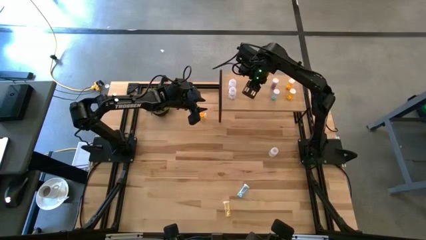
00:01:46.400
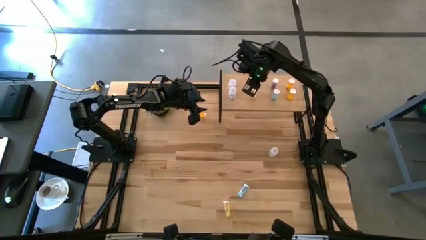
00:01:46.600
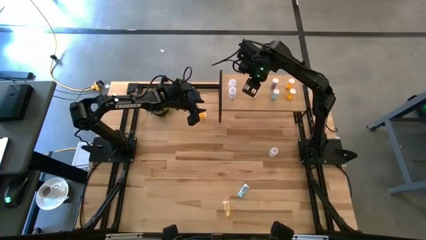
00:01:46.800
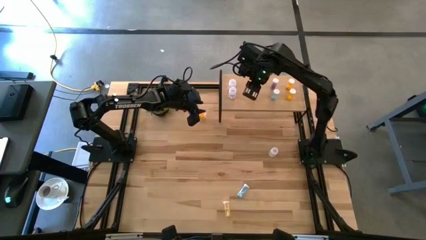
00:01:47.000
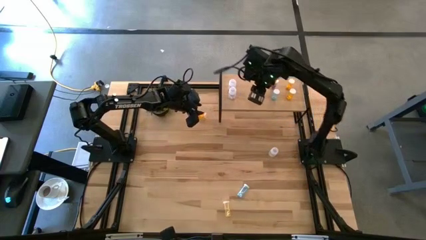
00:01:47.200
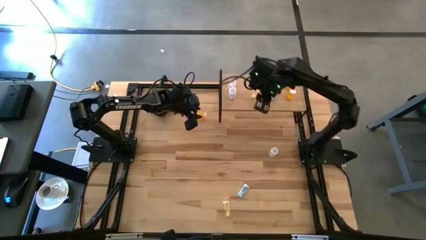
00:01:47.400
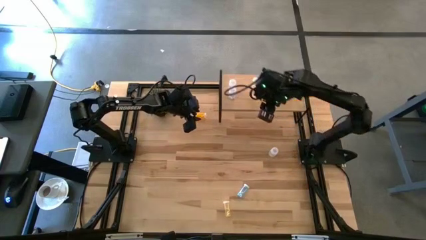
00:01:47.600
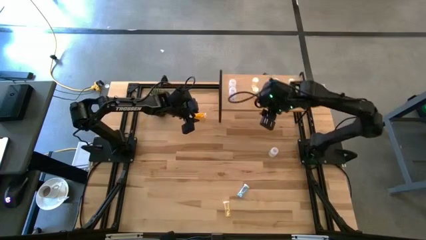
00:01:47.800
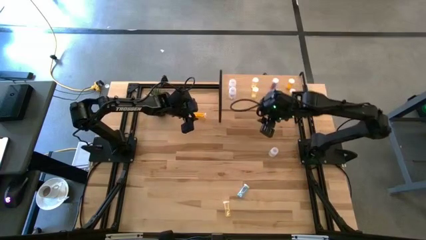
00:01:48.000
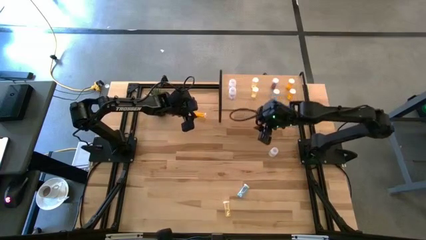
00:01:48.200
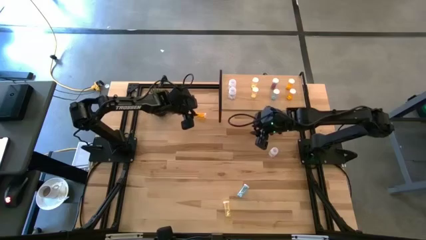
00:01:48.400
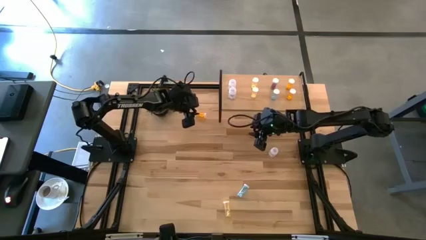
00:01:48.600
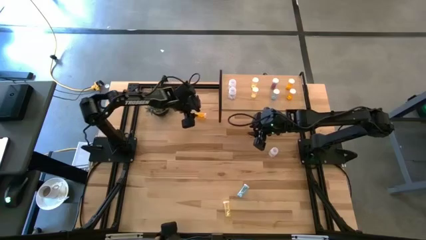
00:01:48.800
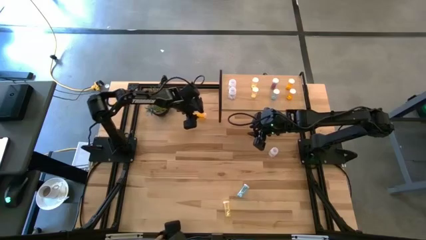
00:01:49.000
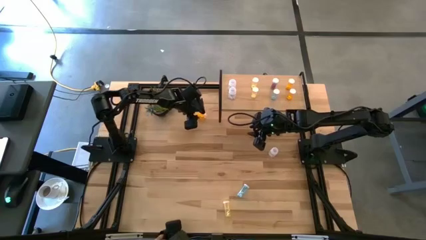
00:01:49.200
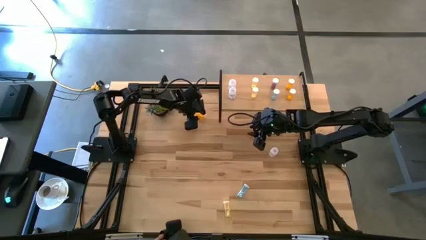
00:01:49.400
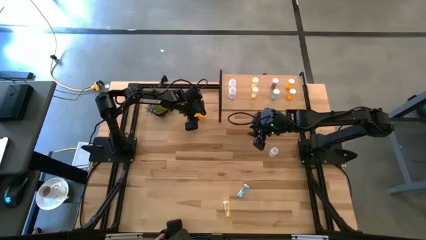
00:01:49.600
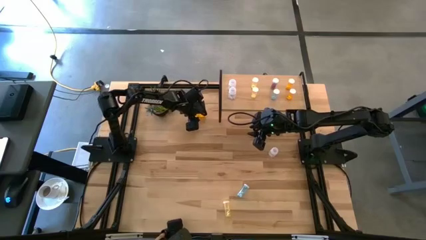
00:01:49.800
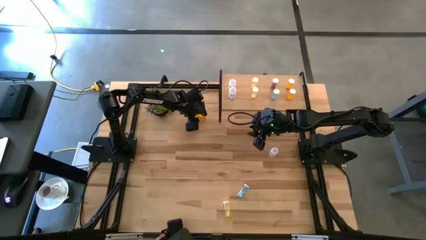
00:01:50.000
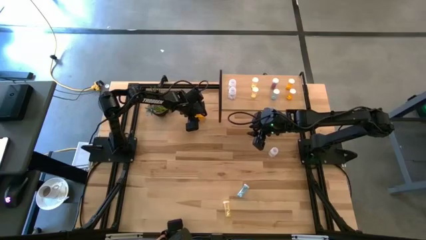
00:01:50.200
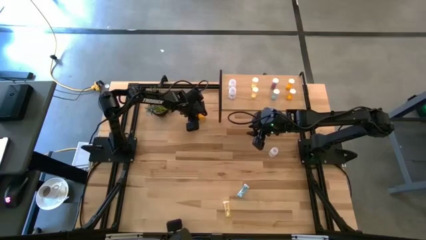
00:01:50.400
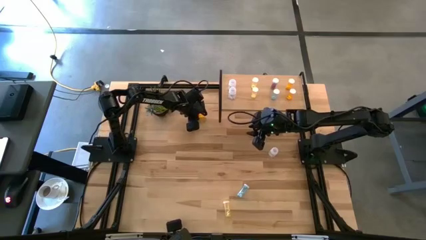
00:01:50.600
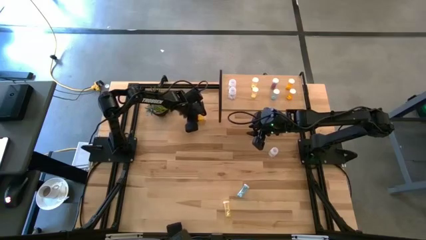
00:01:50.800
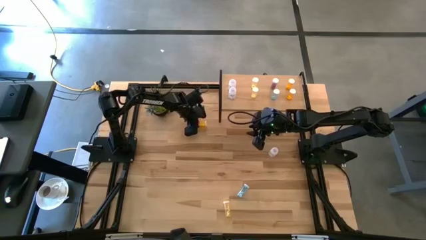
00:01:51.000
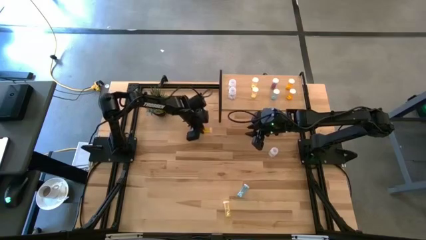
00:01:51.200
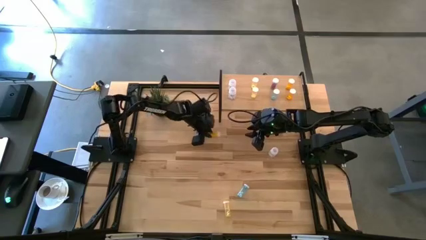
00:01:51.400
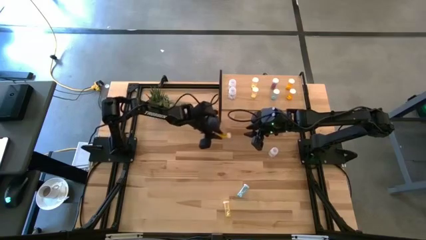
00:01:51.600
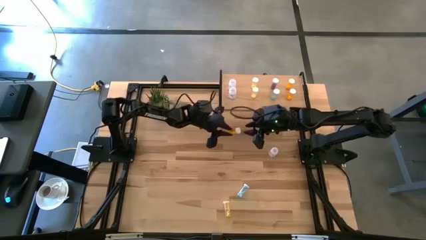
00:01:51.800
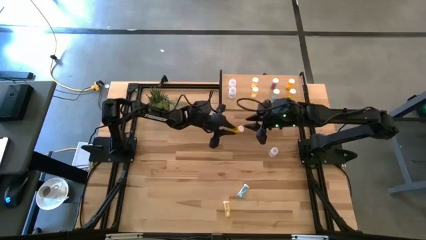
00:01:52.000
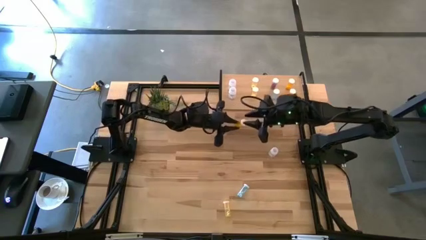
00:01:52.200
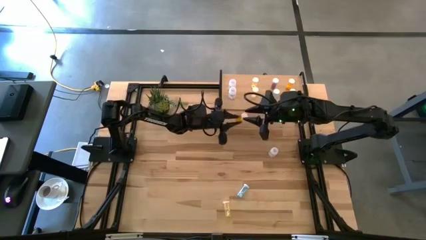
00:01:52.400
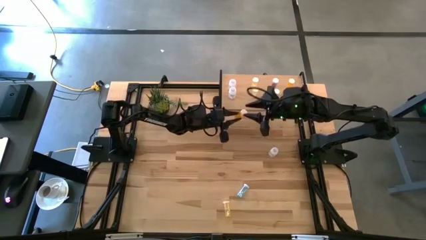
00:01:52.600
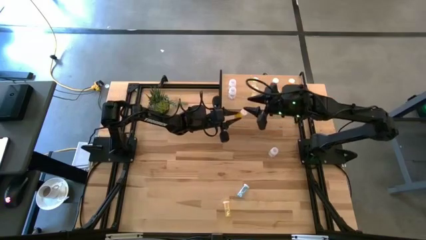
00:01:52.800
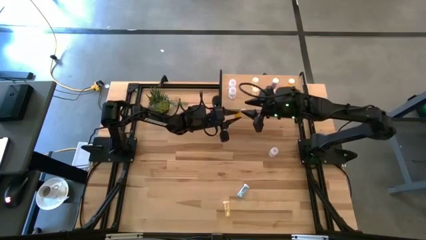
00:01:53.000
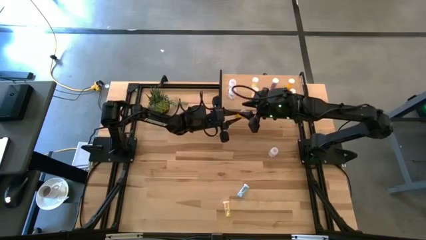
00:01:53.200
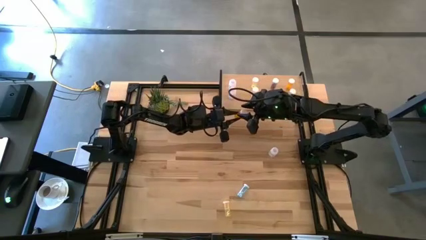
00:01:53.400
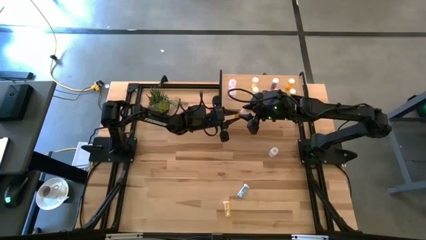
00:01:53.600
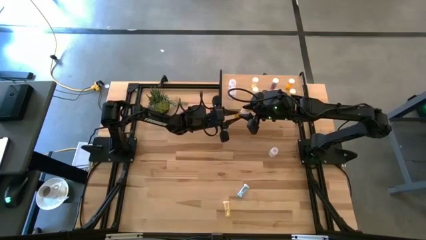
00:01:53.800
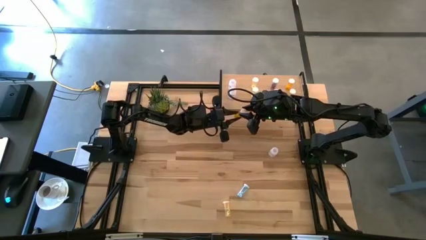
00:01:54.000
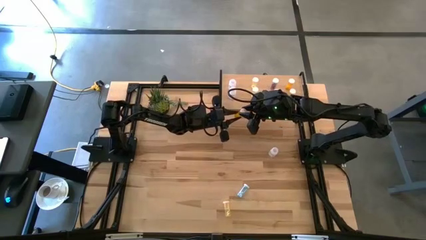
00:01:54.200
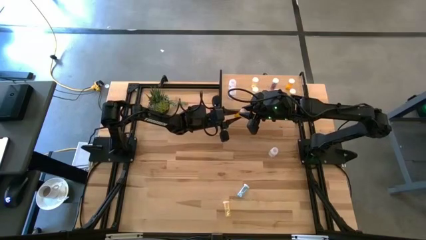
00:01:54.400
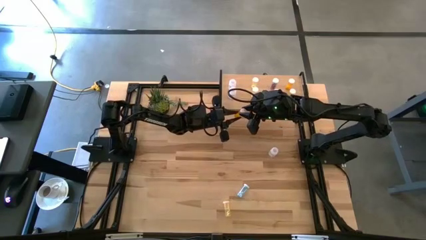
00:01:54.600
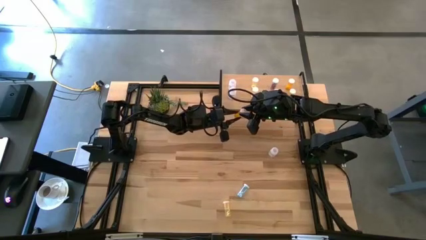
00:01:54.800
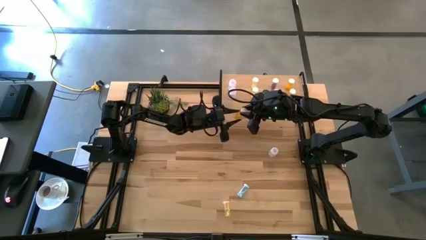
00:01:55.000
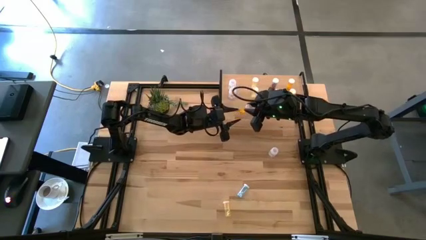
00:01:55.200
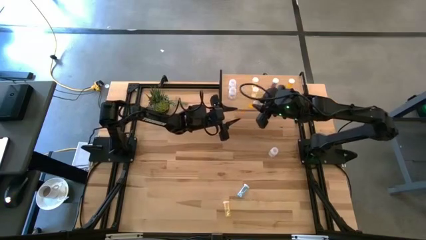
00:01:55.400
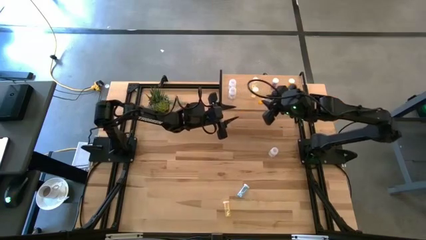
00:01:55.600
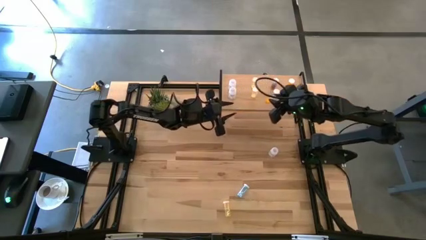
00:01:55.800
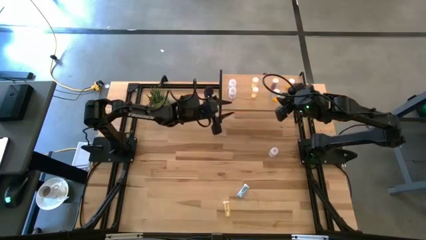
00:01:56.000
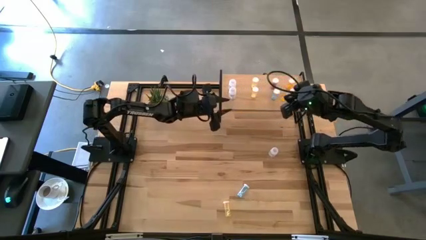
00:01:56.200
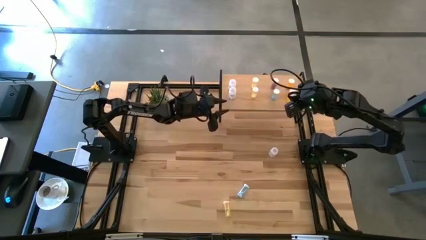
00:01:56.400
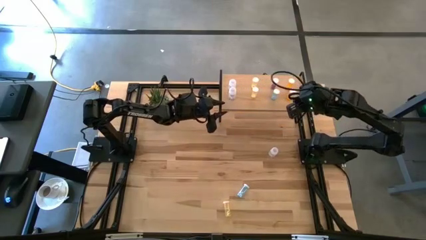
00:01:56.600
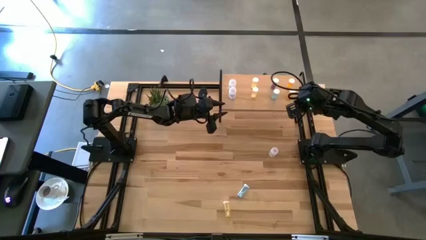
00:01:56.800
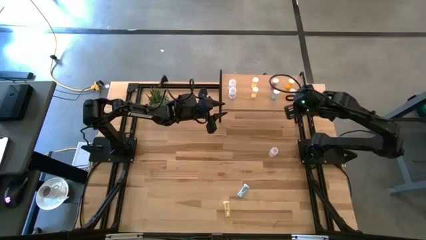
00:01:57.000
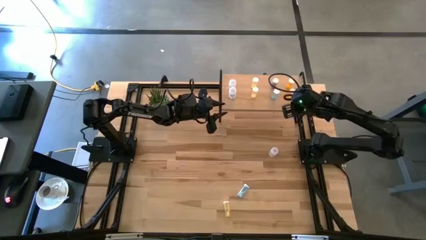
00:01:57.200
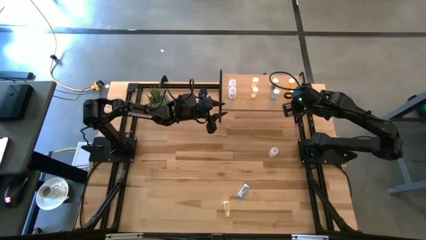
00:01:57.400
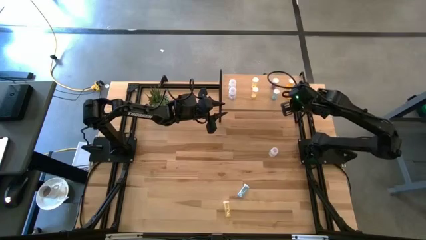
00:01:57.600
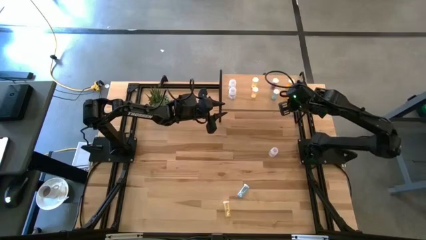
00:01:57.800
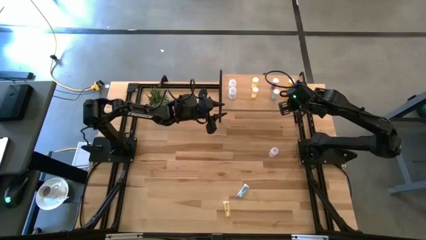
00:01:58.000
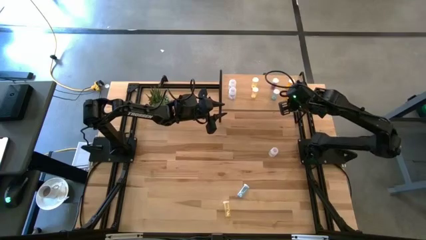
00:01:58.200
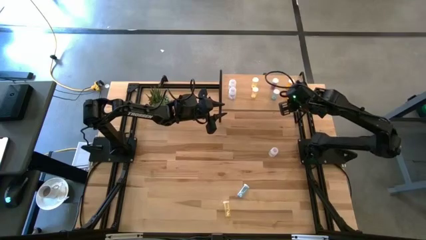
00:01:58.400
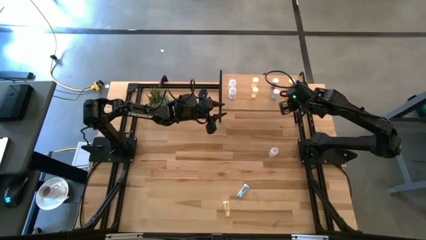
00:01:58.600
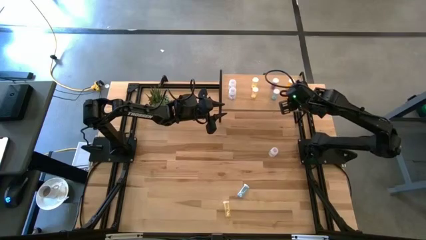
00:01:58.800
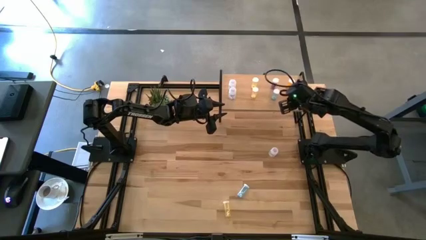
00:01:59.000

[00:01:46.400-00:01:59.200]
Task: Pick and place medicine bottles onto shelf by color
Put the orange pill bottle aligned with the other orange pill bottles on the shelf

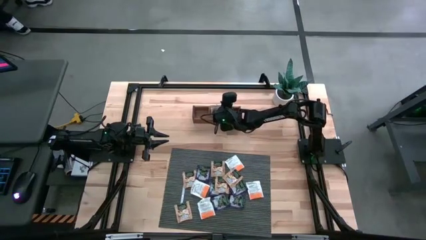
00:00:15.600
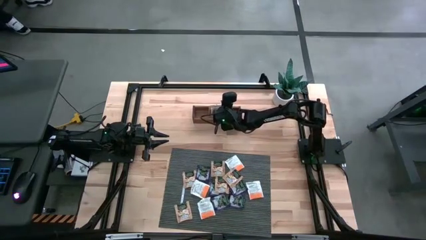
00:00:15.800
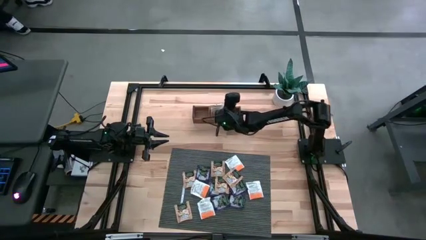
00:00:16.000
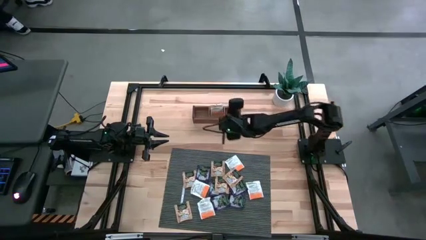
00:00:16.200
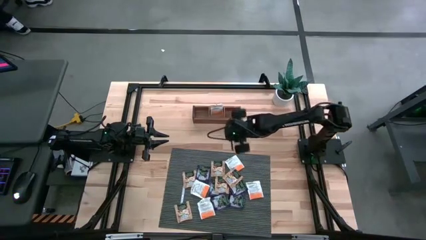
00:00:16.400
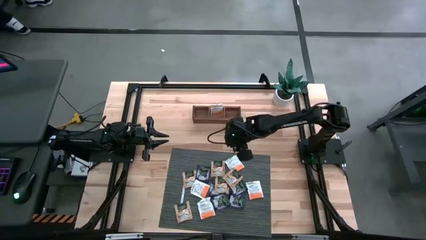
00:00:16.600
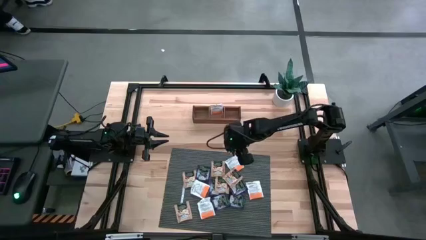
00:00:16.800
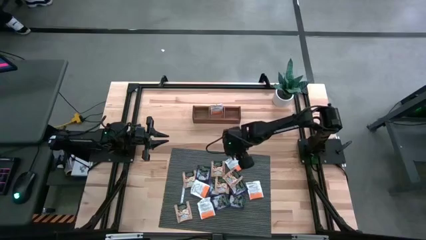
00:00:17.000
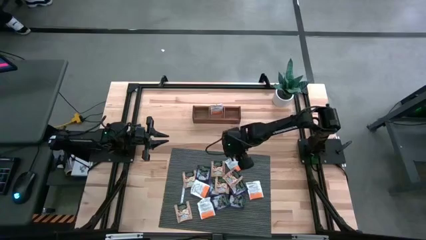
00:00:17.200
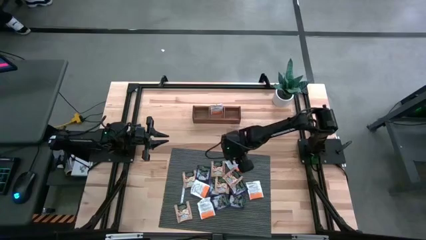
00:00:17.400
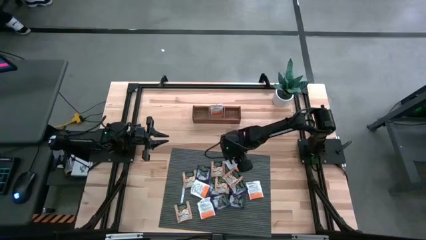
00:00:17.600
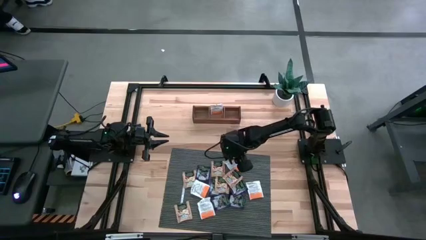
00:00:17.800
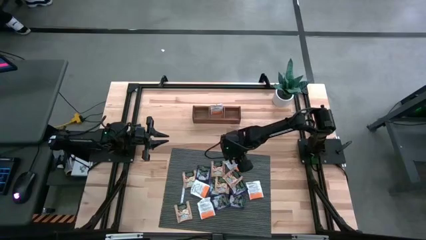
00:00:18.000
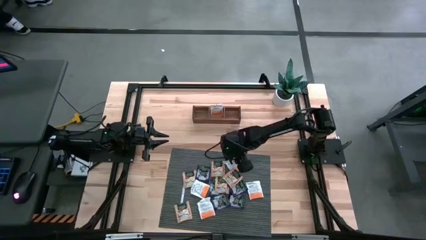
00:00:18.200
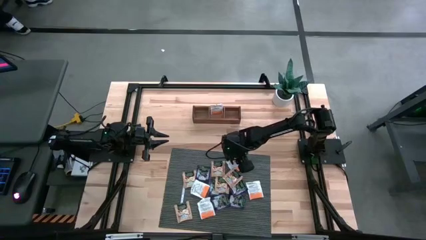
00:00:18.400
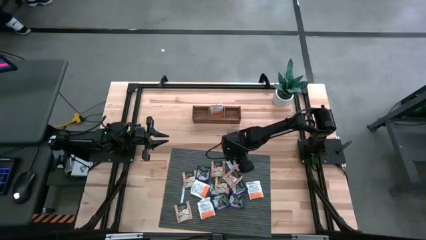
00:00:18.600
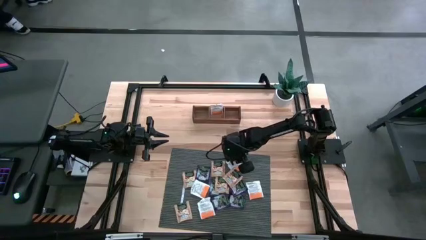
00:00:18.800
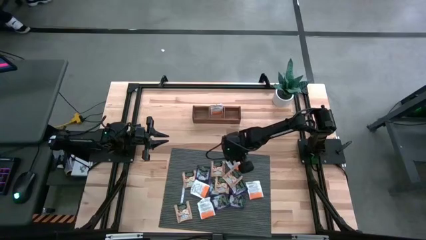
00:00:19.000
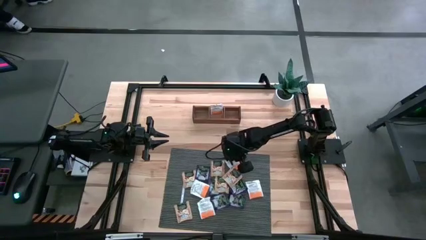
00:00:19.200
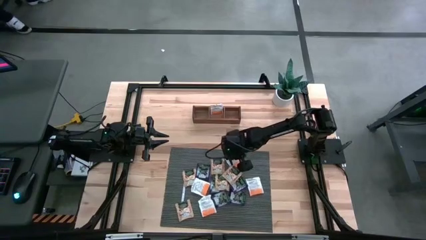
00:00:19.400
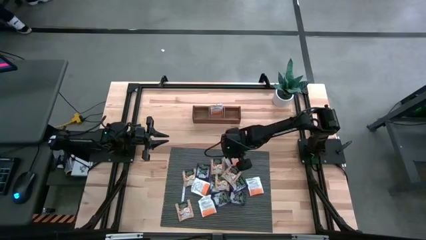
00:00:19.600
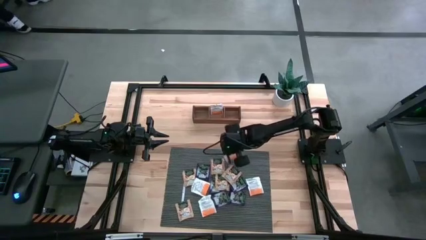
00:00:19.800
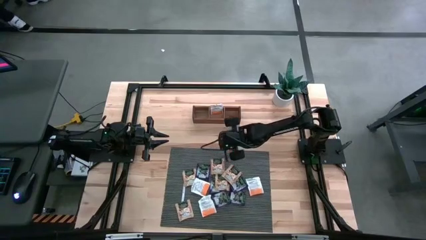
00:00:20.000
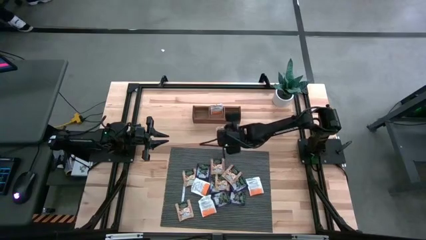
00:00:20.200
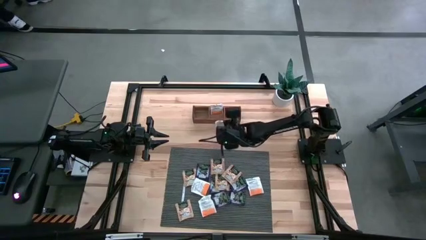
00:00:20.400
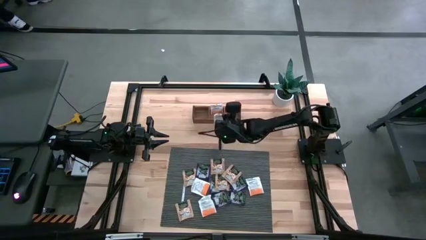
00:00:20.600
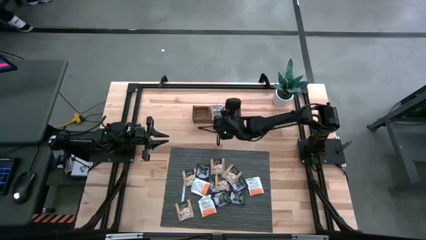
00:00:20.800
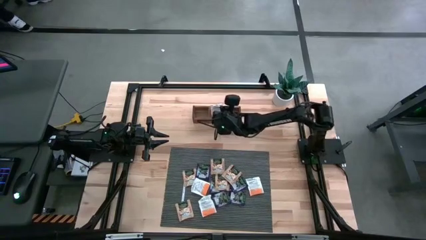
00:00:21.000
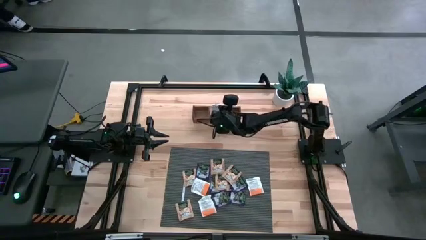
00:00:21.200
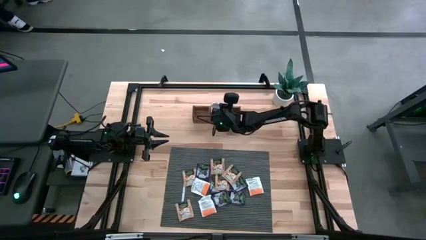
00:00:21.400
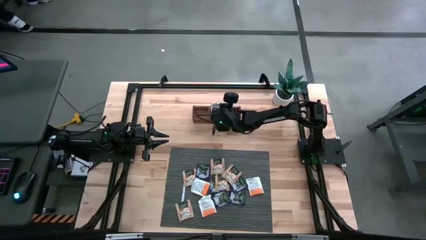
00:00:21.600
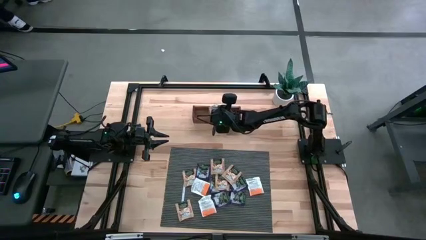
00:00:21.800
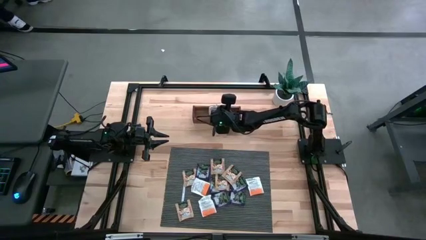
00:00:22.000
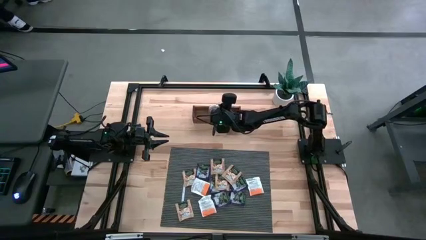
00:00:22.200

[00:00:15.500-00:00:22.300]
Task: Pick & Place Tea
Put the orange tea bag into the middle compartment of the wooden organizer
